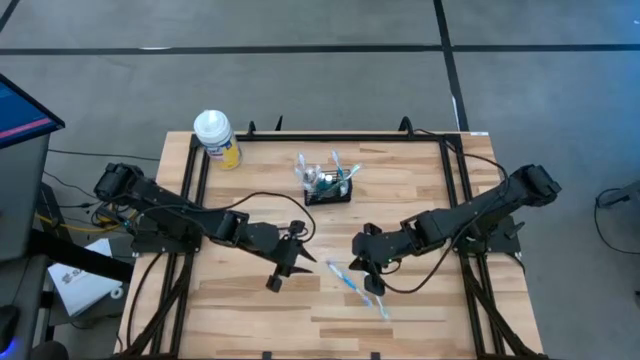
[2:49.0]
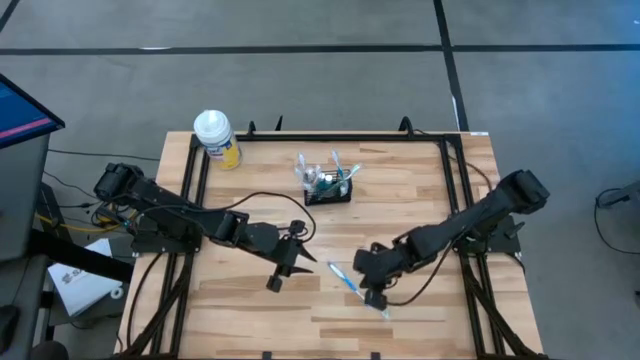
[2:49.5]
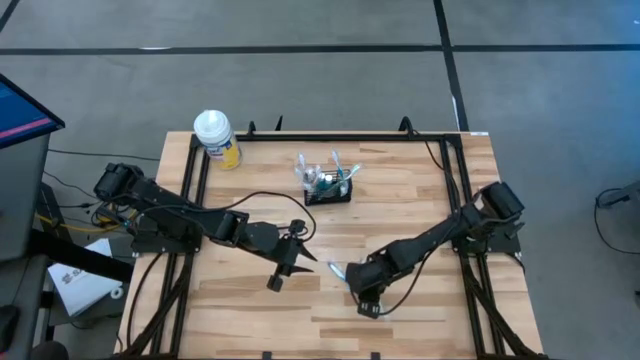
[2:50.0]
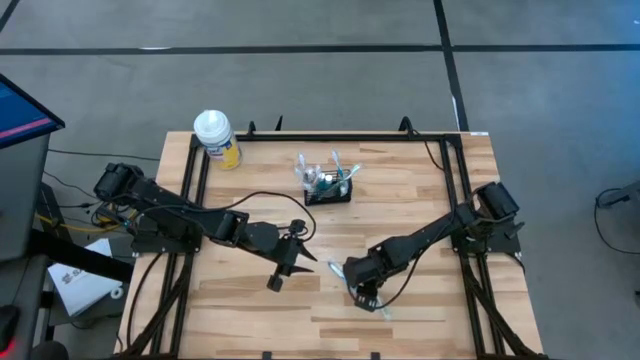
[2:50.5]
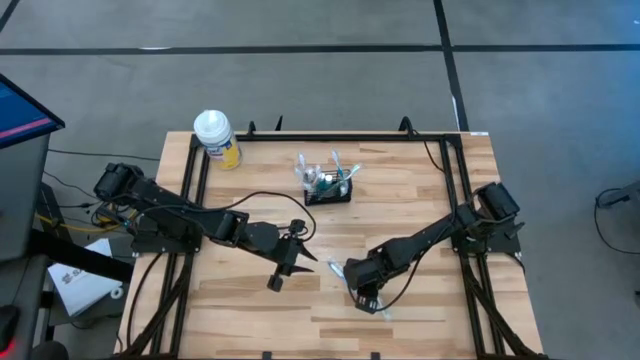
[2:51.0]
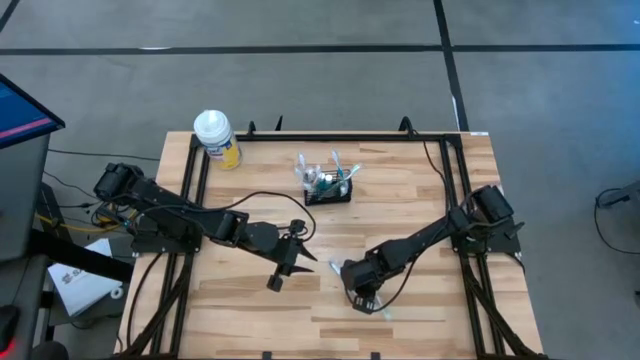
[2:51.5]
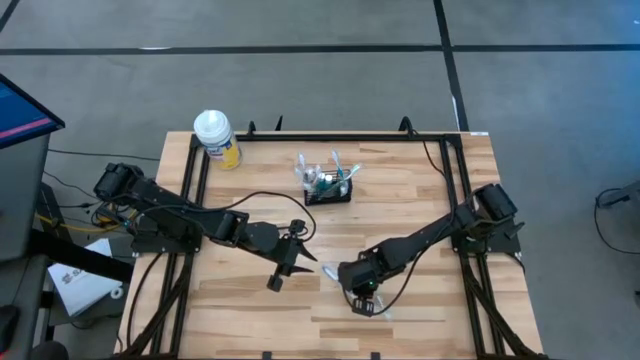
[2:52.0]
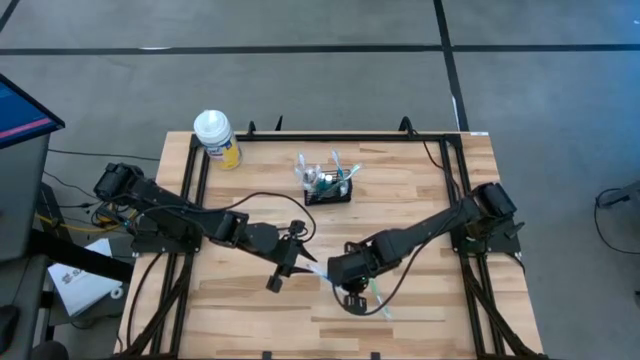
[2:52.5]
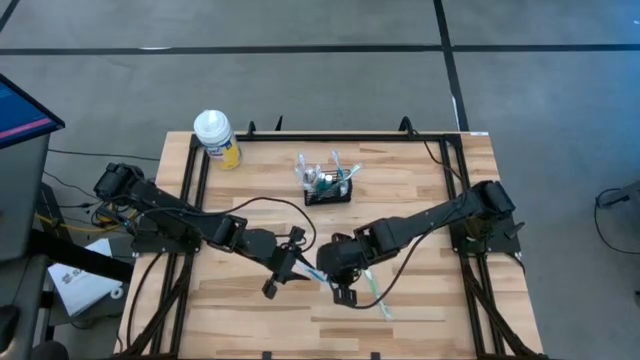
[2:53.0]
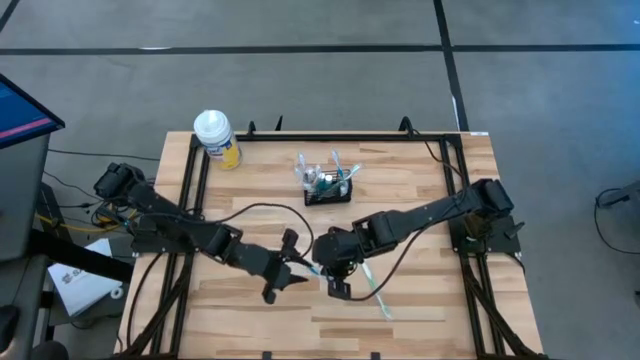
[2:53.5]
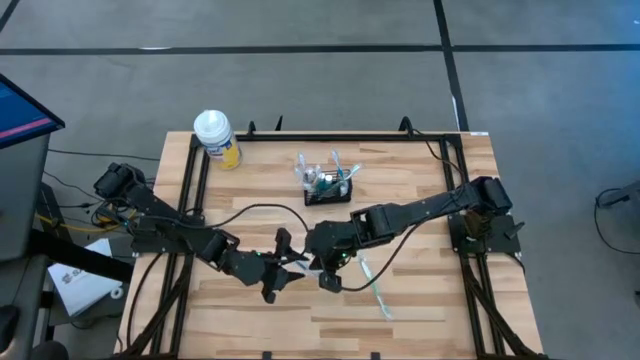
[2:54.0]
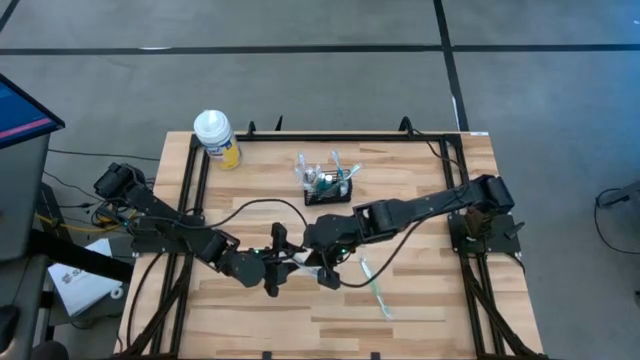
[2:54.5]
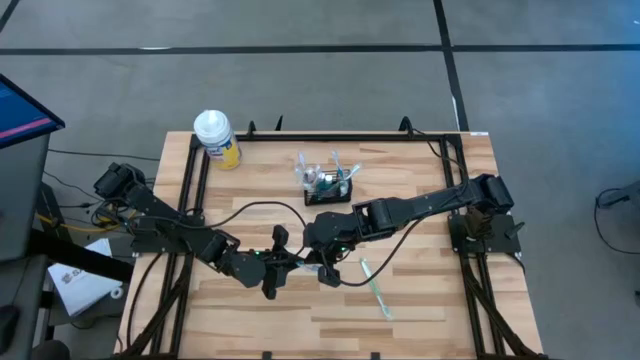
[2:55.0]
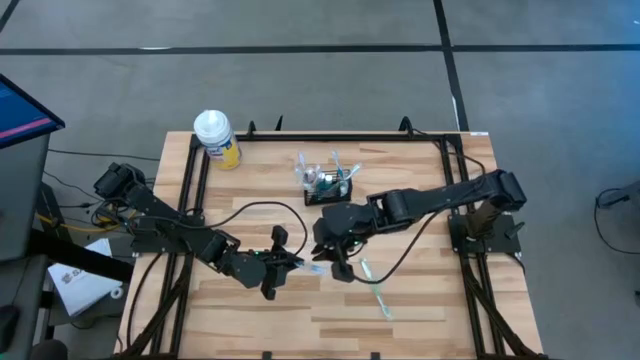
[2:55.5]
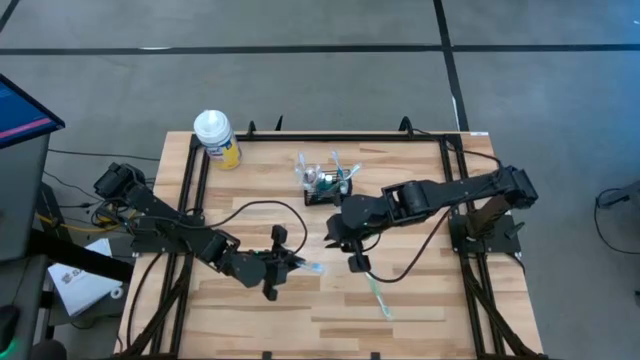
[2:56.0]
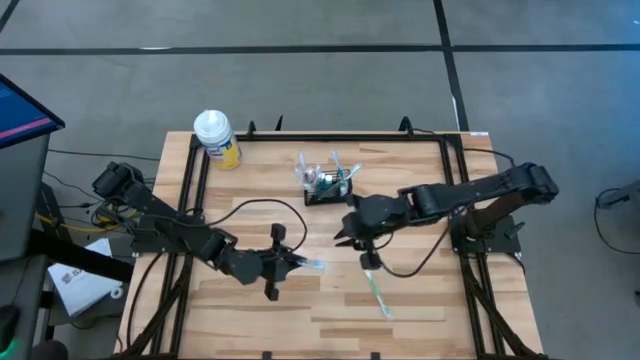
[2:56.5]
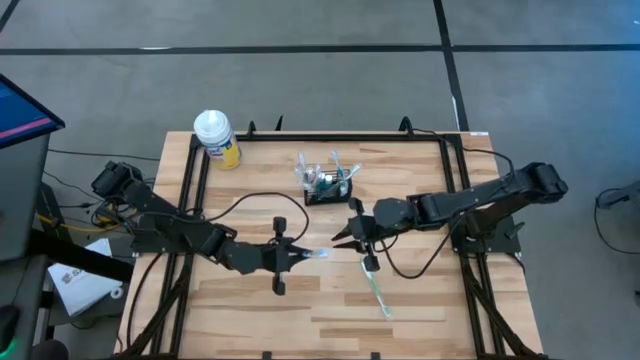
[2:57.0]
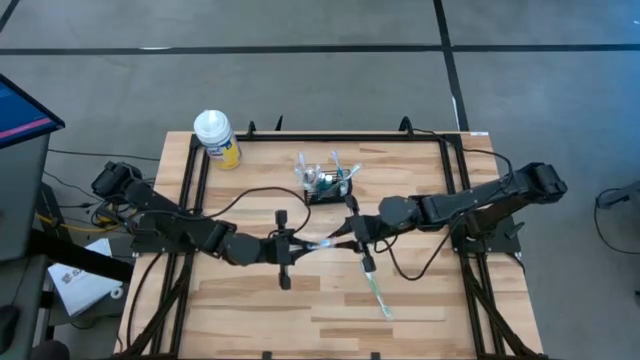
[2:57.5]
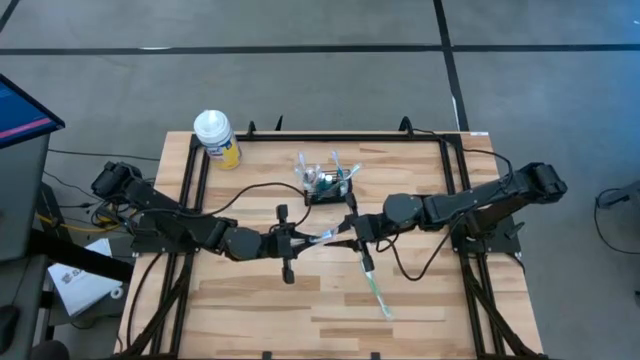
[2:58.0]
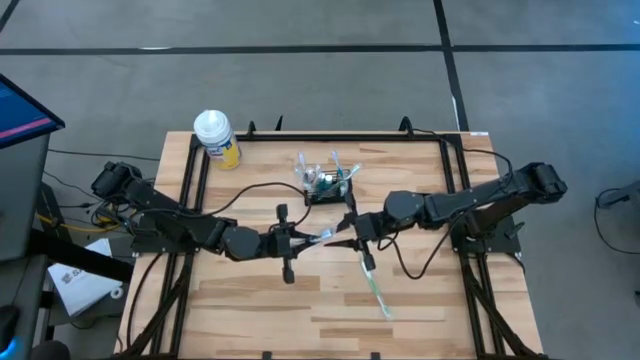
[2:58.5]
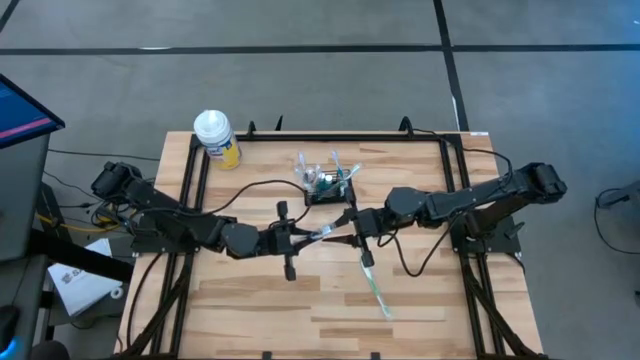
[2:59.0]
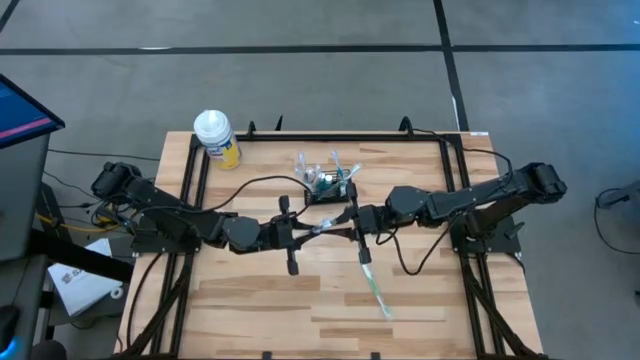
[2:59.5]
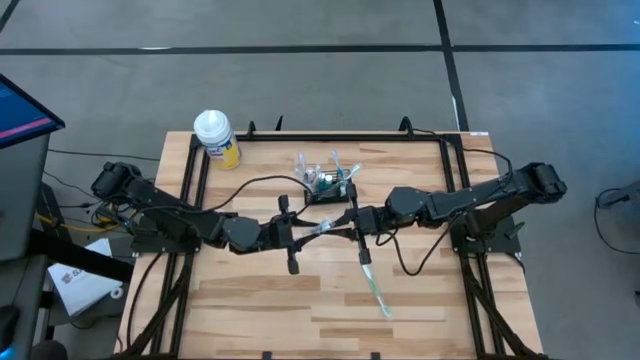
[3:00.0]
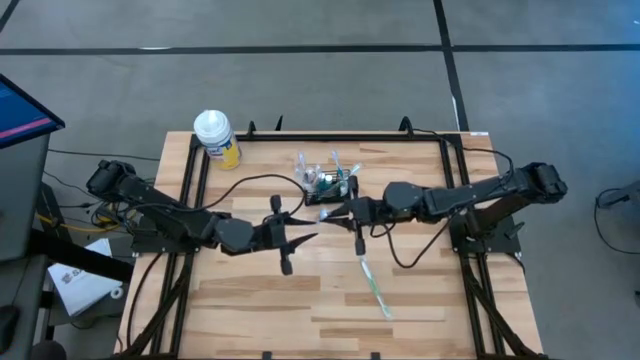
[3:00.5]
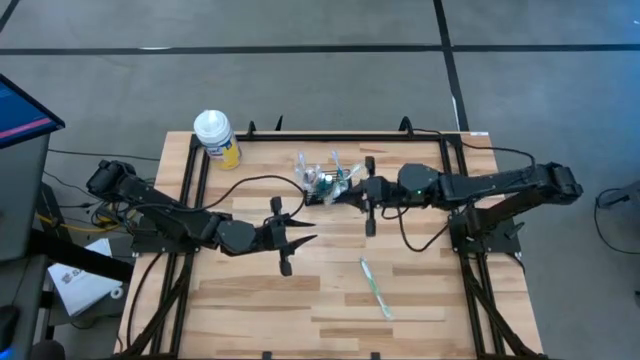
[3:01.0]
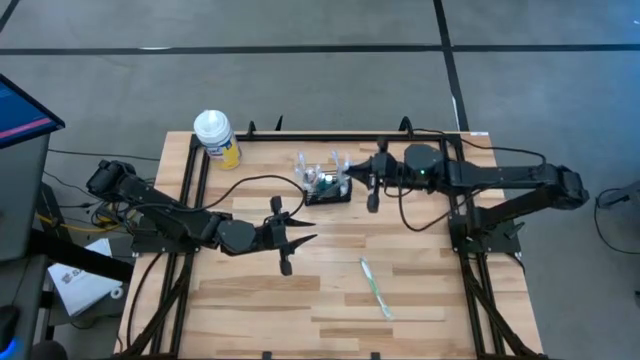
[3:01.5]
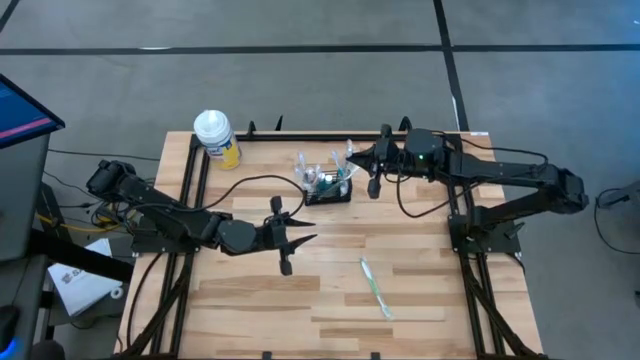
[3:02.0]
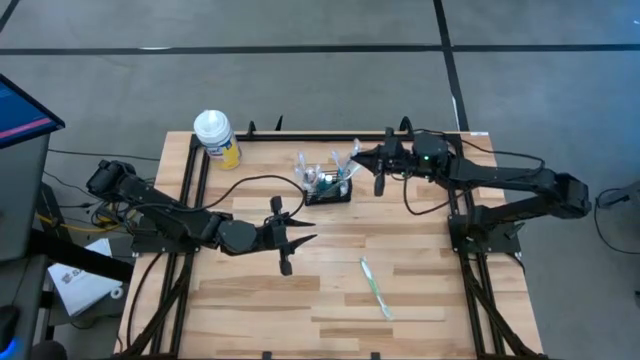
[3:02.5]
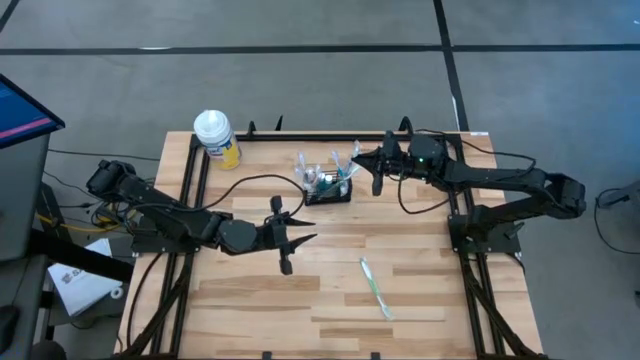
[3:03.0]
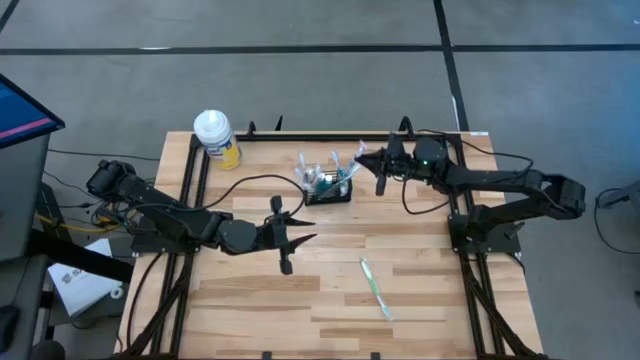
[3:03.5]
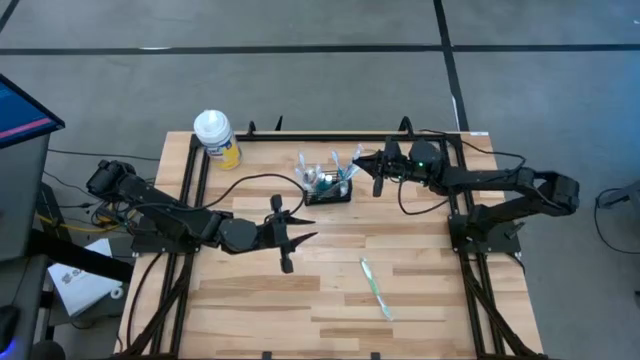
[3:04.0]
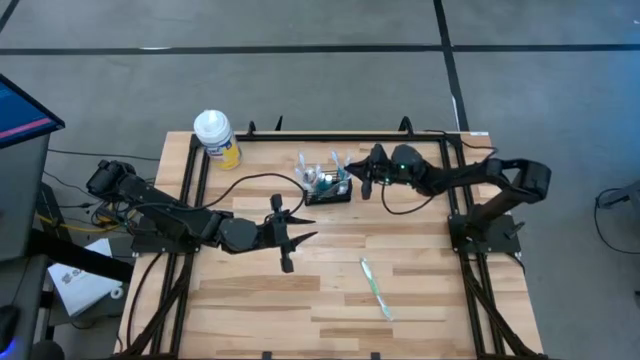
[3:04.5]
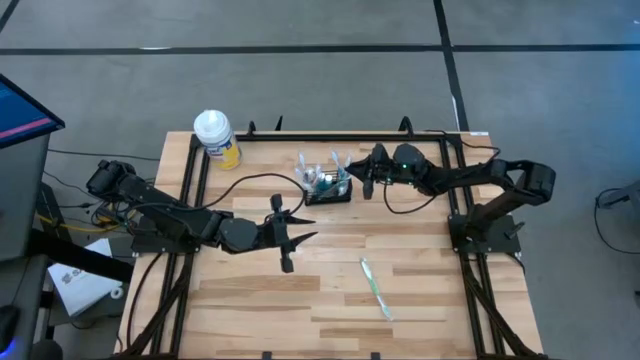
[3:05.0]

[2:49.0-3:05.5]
Task: Pick & Place toothbrushing station
Put the blue toothbrush into the black mesh organizer

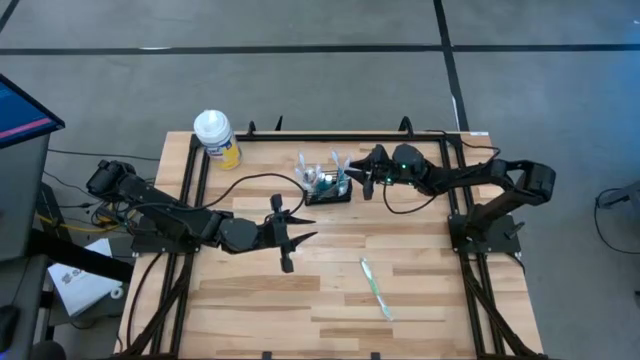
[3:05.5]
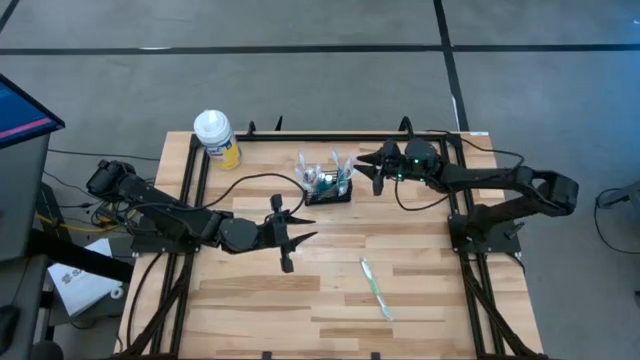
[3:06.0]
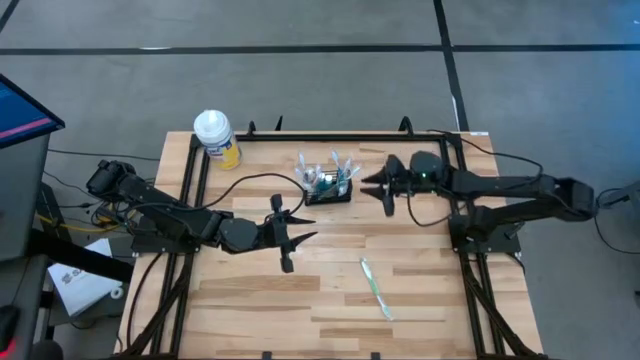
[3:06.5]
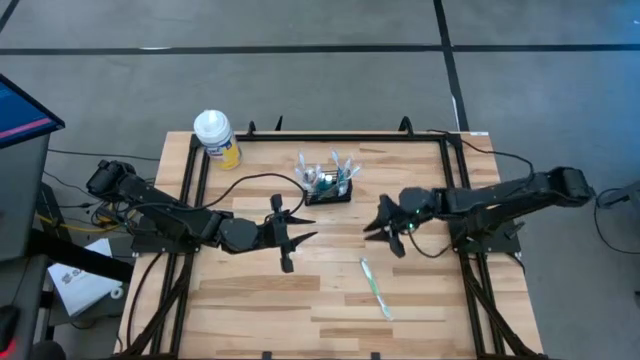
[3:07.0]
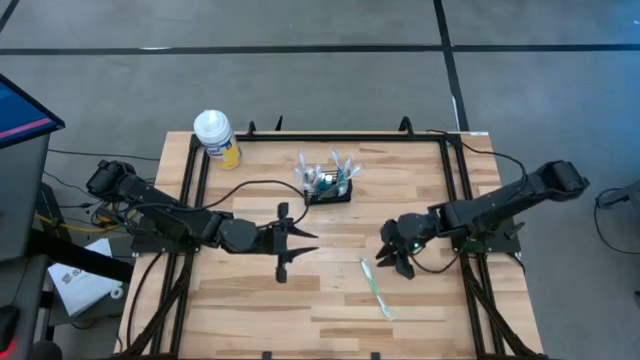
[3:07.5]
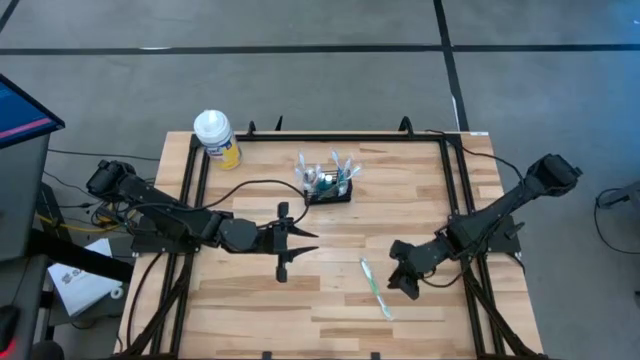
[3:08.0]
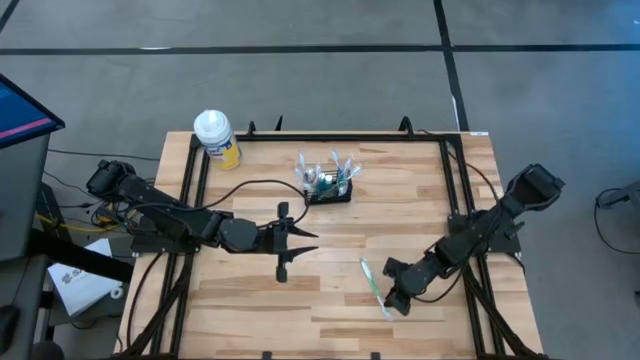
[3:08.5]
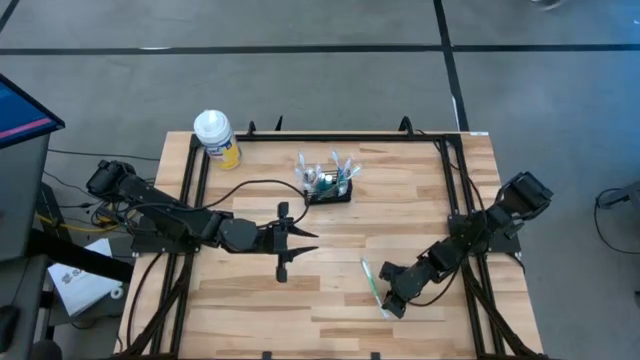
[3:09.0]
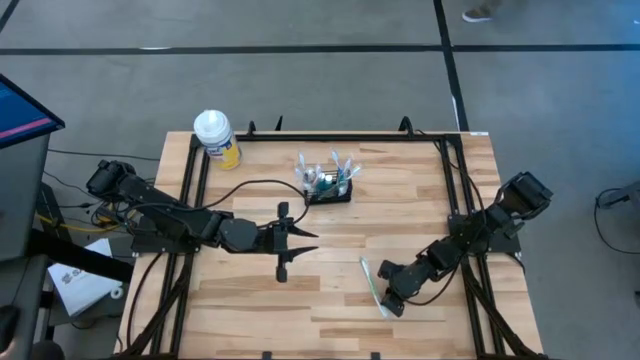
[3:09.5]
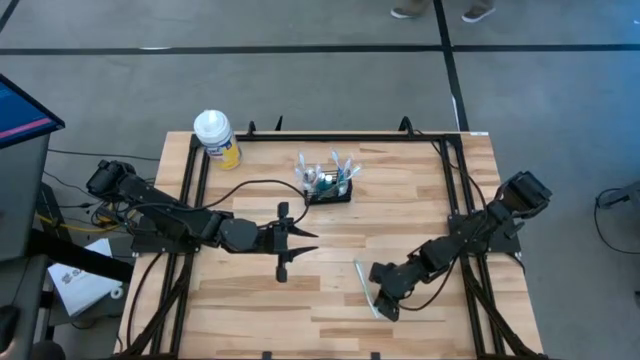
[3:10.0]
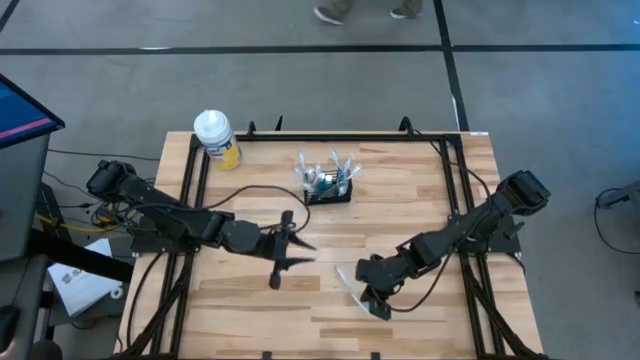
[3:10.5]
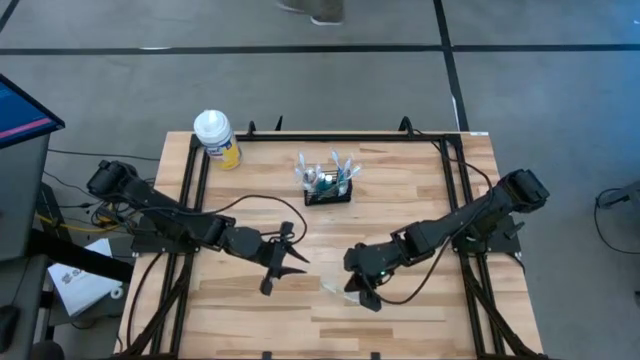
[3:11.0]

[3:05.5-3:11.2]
Put the green toothbrush into the black mesh organizer
